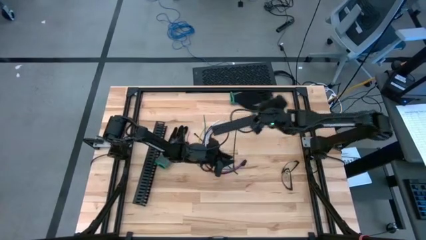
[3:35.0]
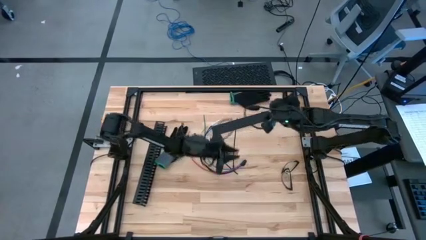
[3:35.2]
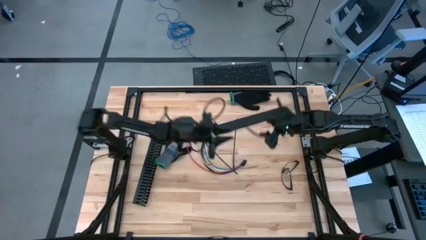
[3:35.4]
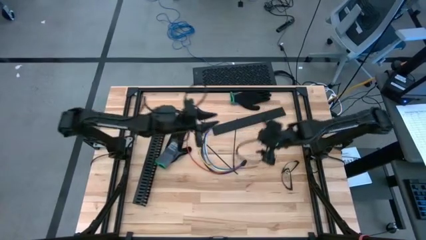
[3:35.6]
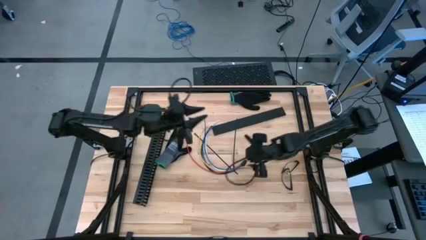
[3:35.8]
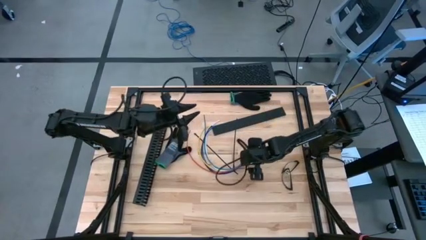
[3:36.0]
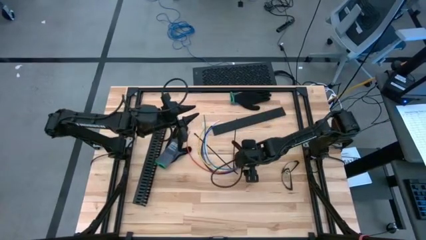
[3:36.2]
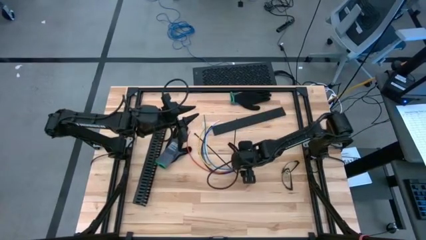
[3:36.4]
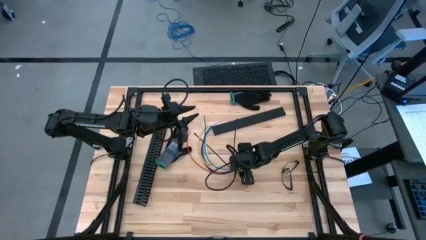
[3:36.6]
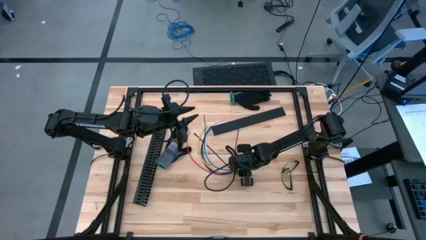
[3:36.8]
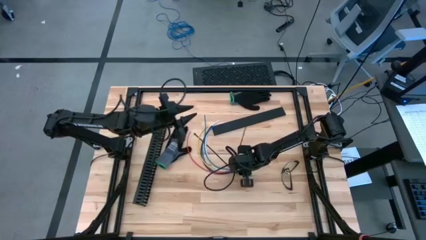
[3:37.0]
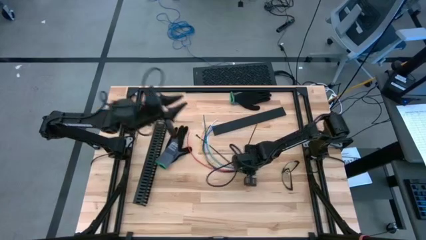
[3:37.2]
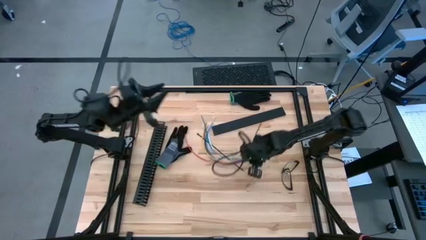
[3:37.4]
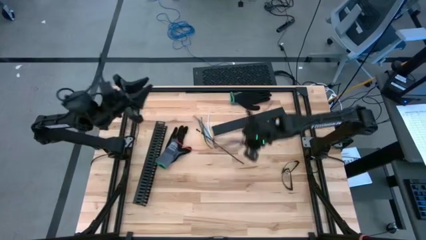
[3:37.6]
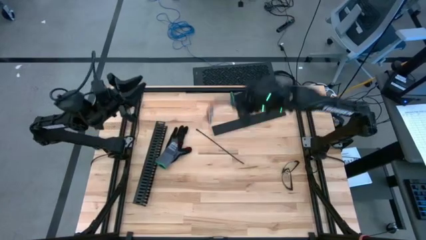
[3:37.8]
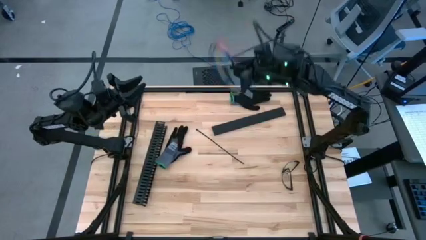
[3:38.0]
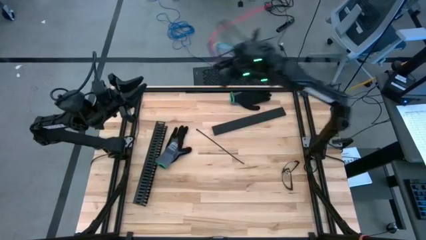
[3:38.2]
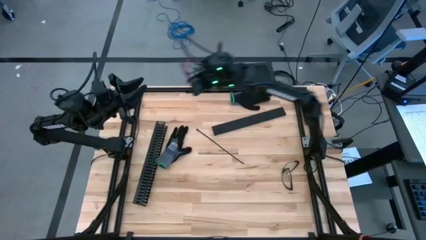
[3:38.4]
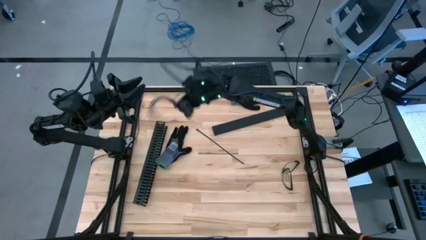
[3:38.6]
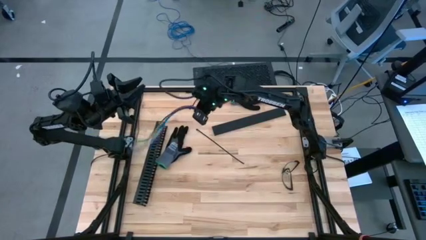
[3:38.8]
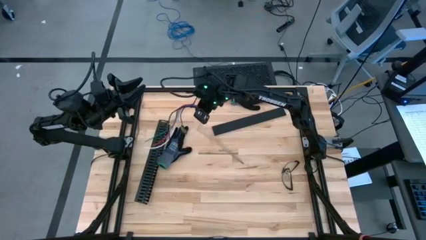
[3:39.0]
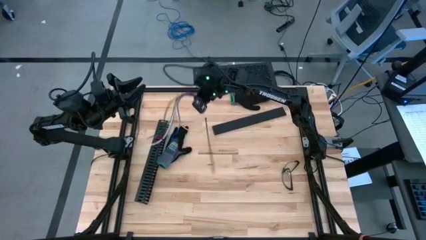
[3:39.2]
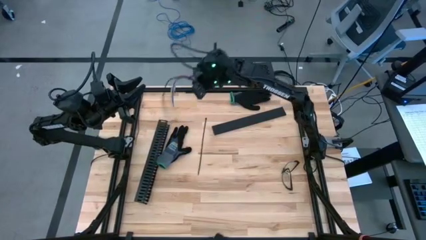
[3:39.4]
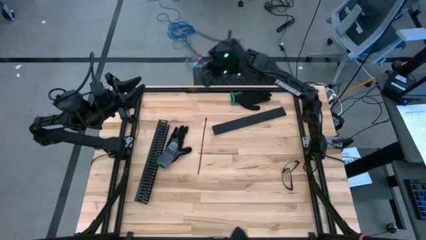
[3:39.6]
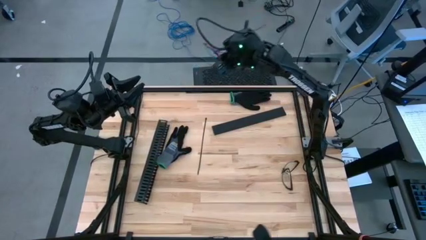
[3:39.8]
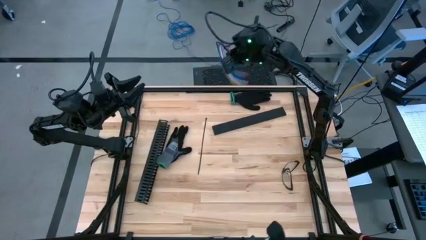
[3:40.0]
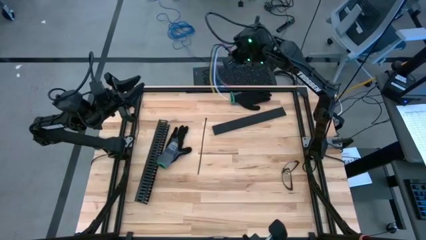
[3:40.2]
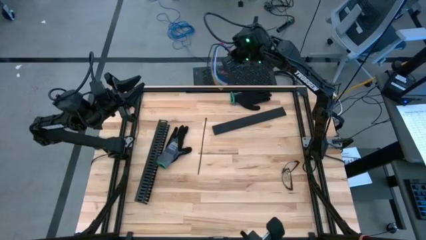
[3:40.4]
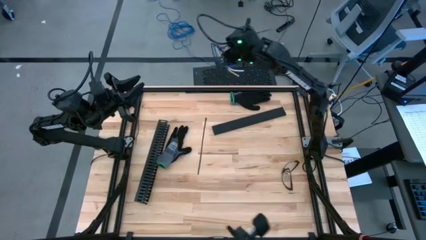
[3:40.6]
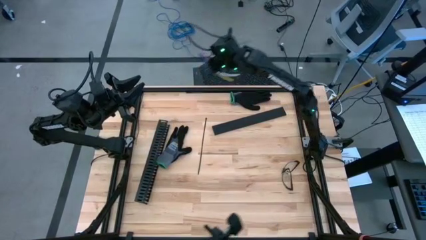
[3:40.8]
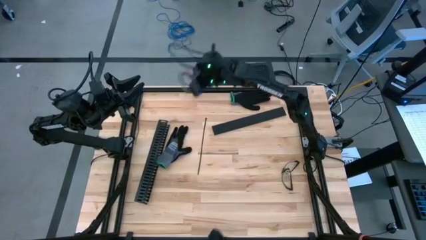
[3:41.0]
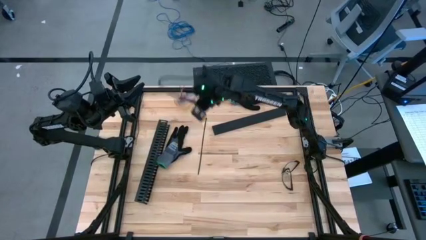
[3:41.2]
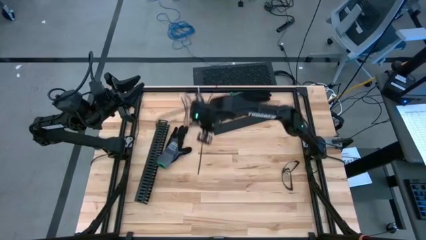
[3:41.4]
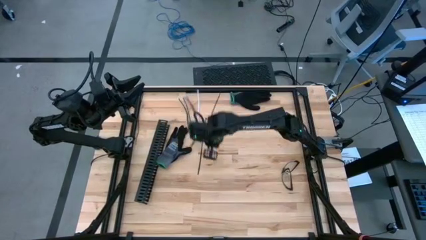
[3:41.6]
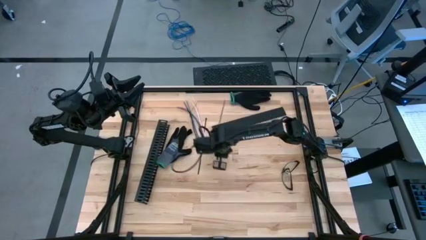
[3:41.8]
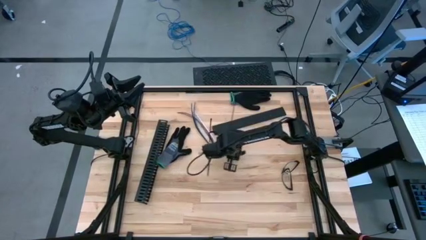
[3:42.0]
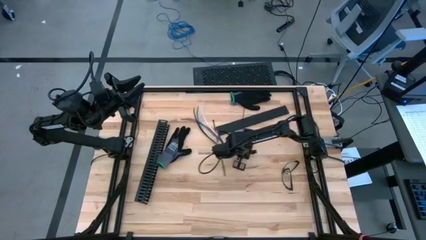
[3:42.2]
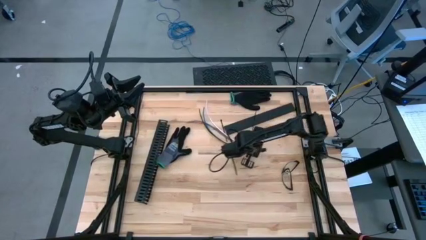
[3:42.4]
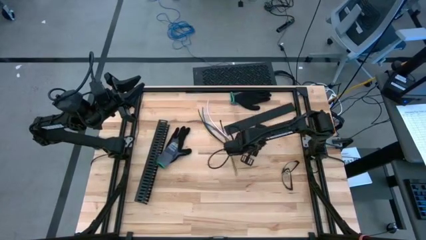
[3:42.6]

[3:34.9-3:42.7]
Task: Ziptie cables
Put the zip tied cable wires into the black cable duct

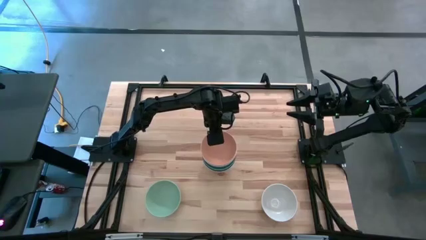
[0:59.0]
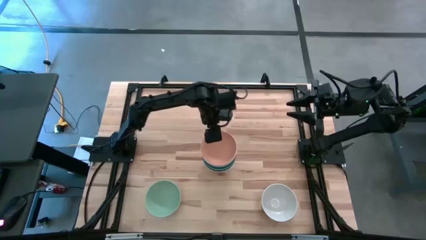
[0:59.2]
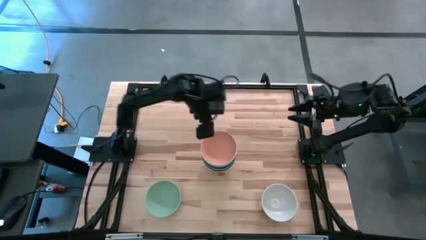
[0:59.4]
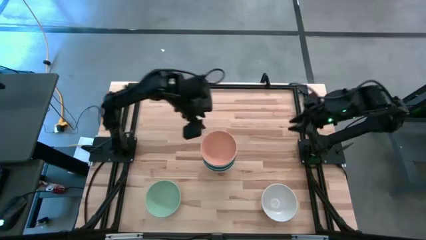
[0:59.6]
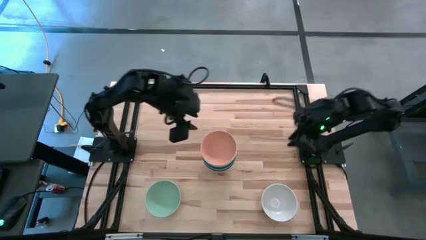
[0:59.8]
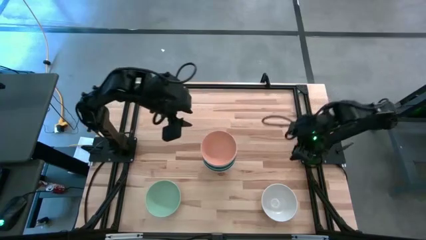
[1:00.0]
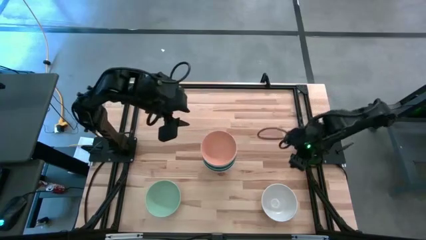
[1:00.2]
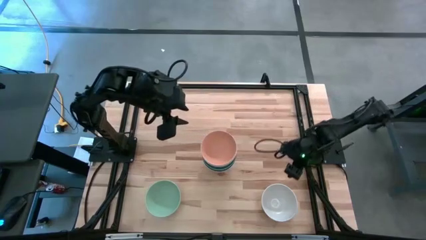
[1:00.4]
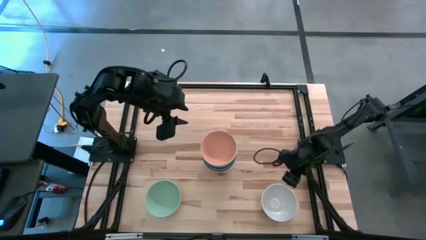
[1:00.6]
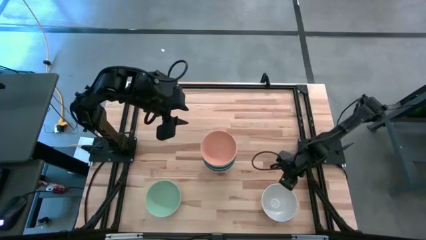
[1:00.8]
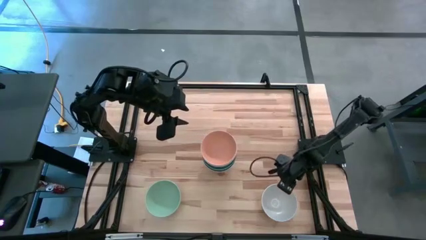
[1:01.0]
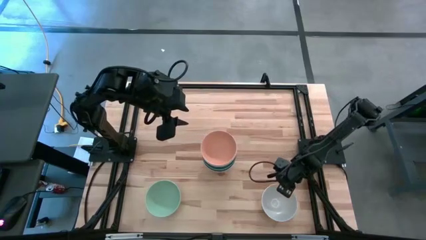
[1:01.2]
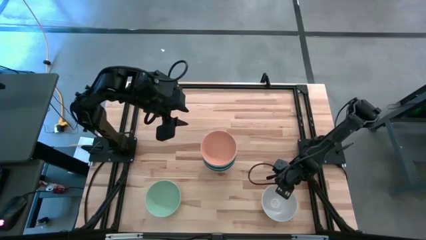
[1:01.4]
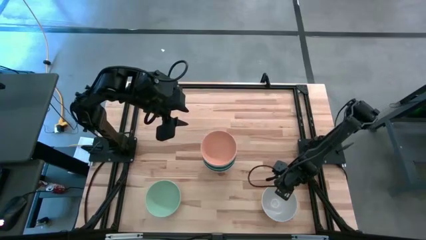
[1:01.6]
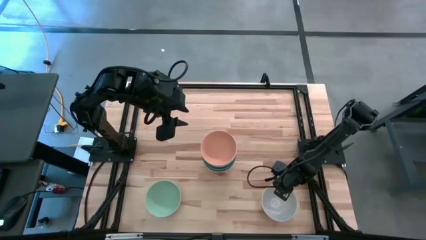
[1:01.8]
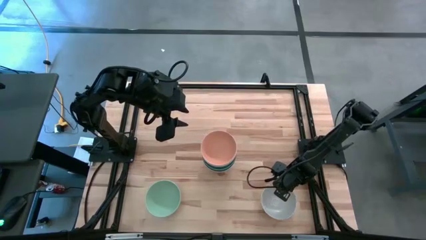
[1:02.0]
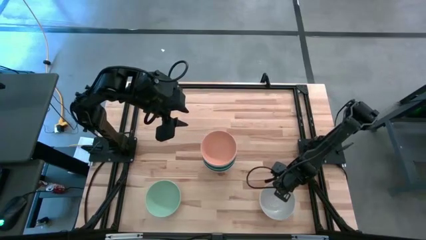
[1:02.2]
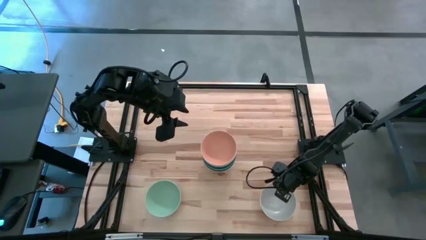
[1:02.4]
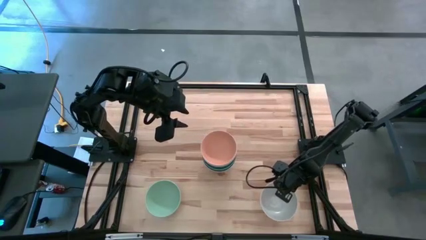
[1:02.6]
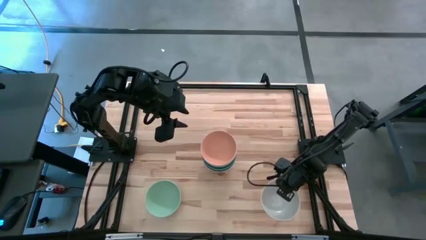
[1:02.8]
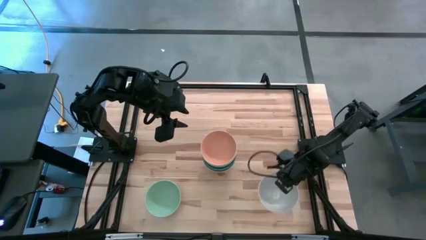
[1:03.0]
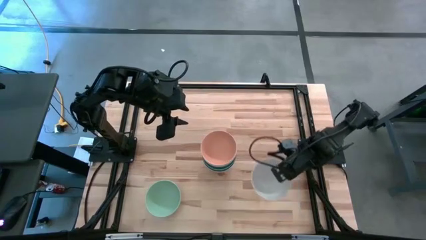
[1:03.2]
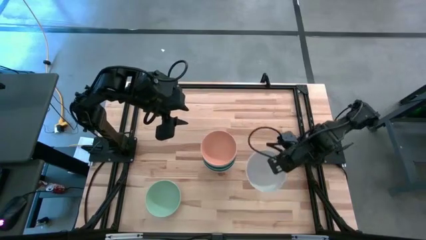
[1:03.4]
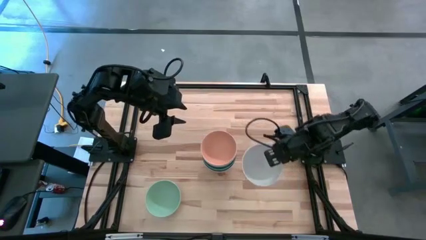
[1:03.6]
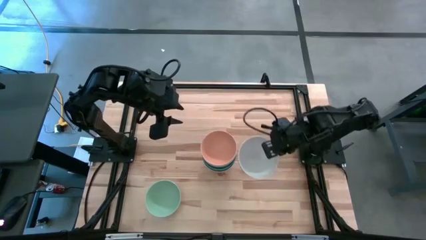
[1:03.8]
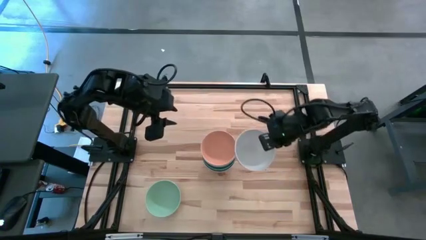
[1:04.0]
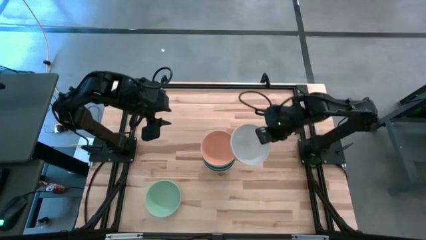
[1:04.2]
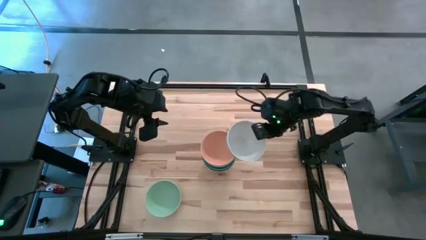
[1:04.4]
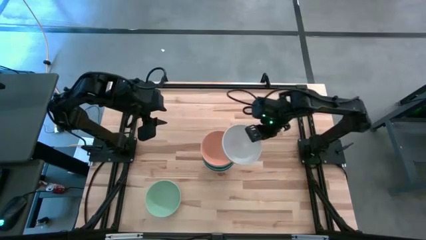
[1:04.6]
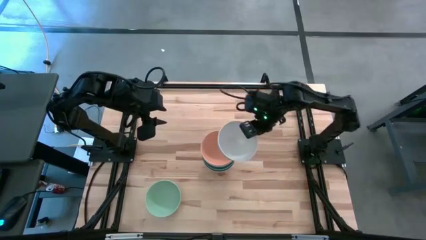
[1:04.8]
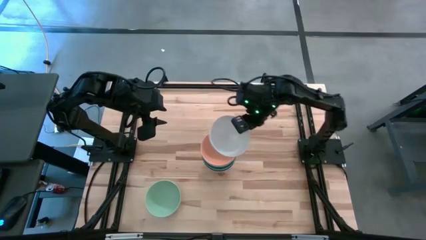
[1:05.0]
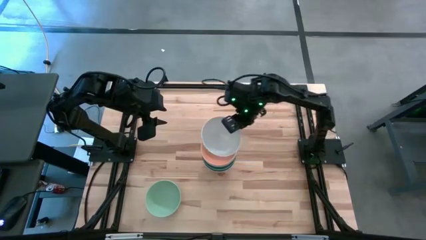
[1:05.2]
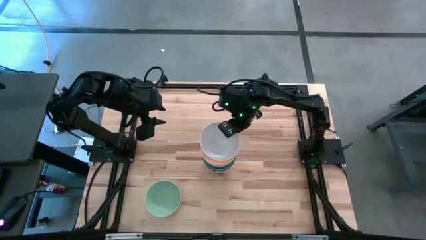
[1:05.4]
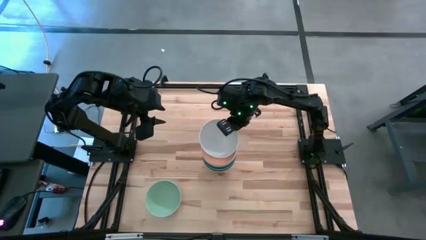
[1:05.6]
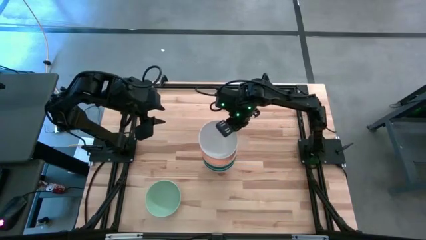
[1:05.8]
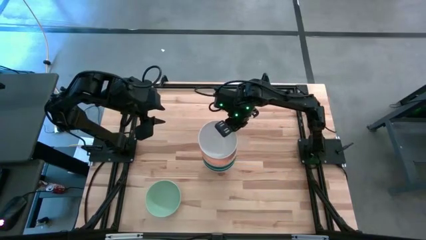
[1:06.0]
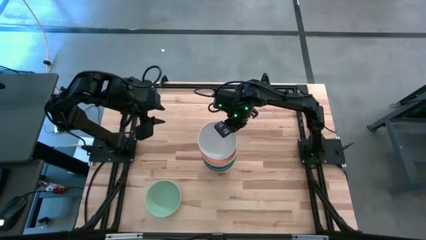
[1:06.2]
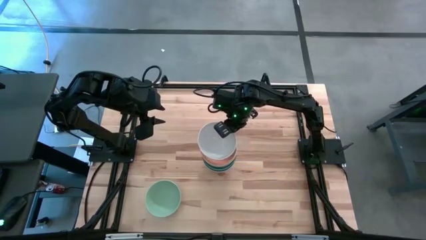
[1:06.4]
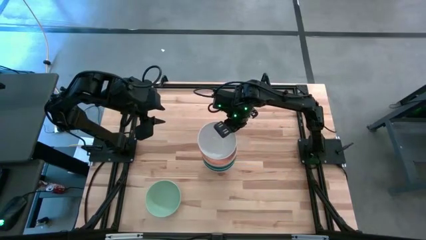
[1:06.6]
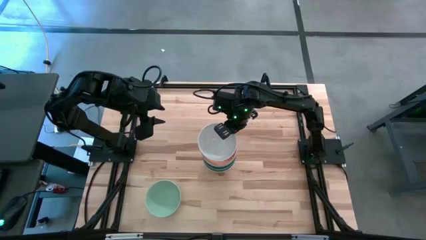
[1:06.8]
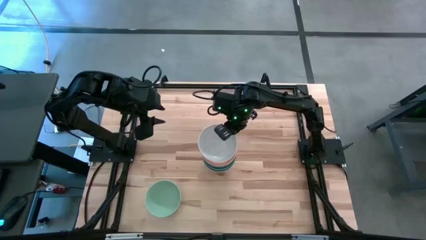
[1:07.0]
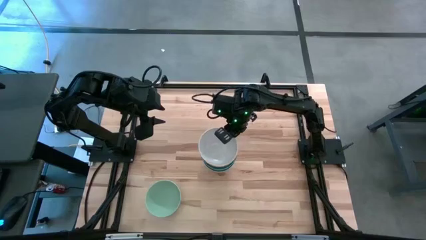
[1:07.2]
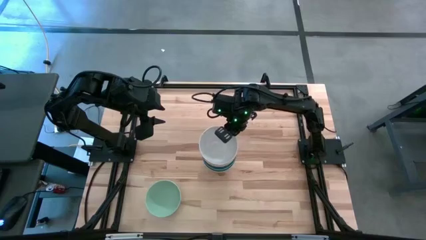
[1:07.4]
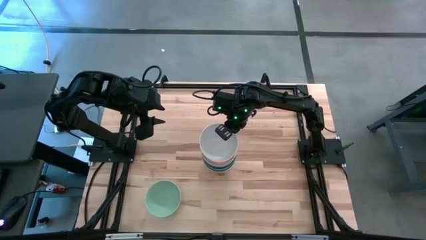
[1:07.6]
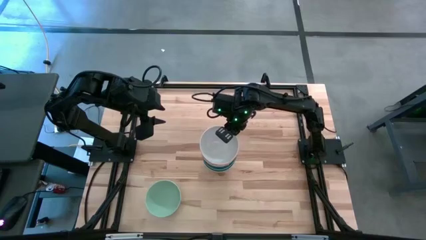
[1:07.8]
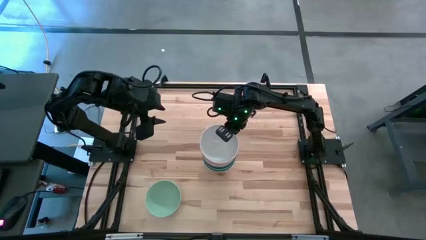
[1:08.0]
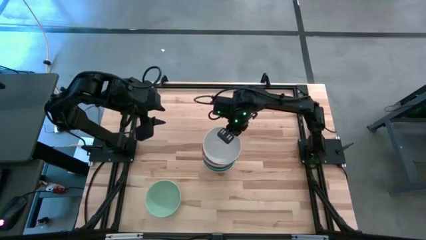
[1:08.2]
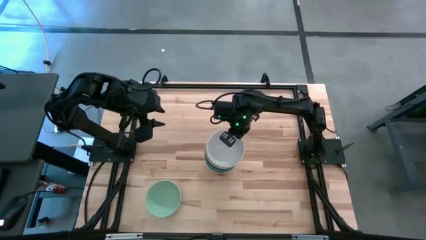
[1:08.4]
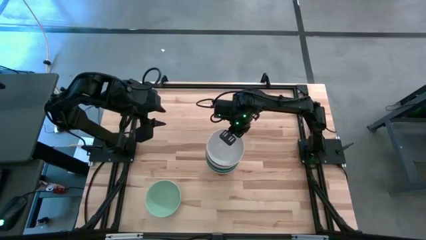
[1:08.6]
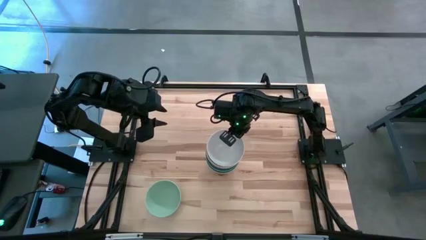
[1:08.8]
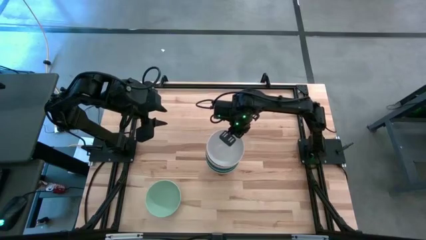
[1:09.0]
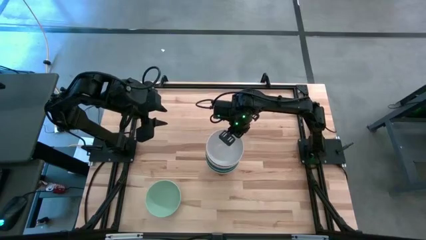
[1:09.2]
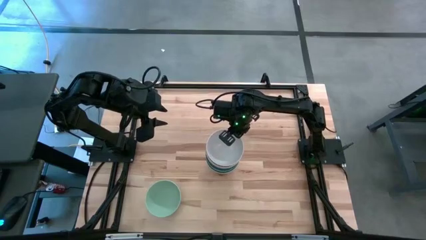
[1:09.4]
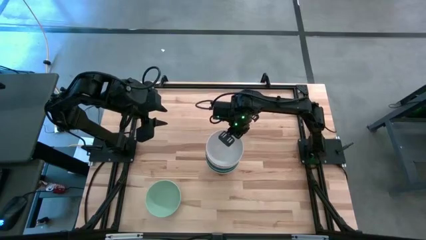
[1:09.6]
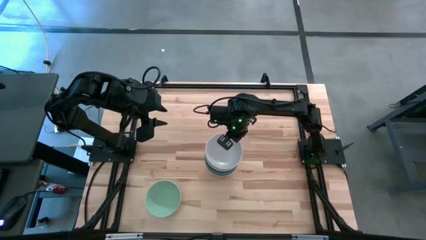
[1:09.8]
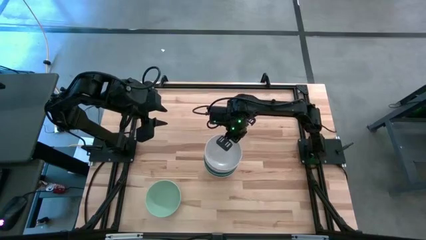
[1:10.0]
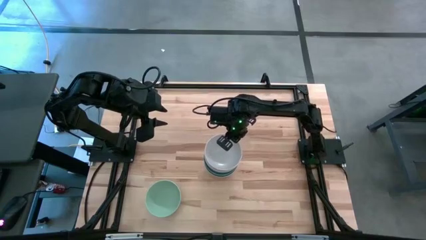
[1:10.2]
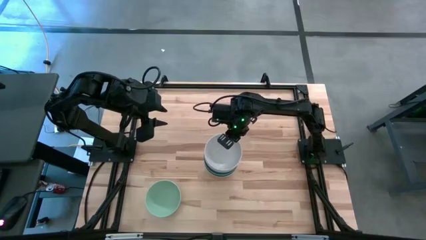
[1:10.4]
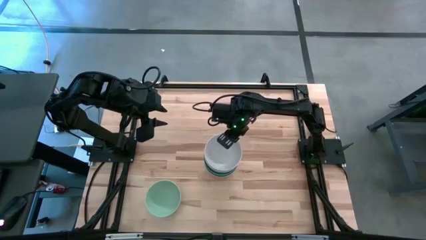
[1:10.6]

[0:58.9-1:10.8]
Task: Nest bowls inside each other
Stack the white bowl on top of the brown bowl
